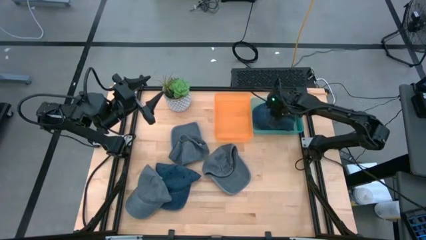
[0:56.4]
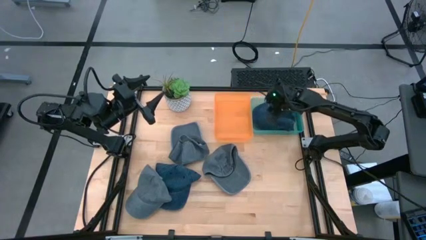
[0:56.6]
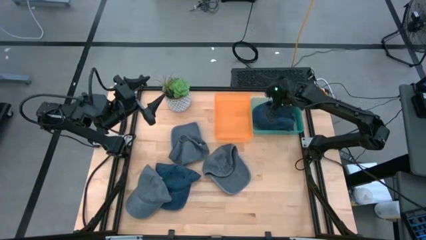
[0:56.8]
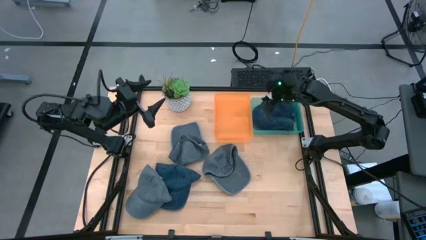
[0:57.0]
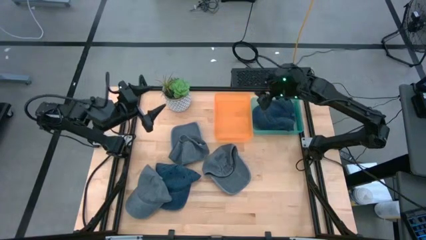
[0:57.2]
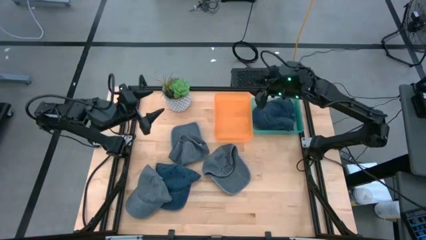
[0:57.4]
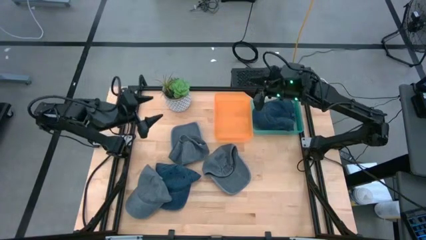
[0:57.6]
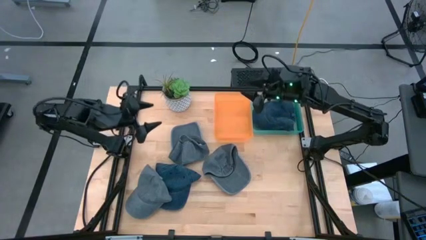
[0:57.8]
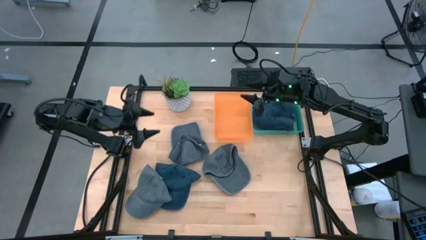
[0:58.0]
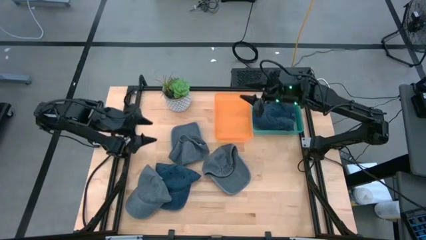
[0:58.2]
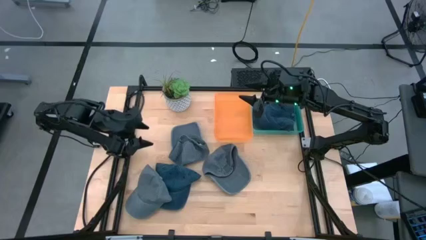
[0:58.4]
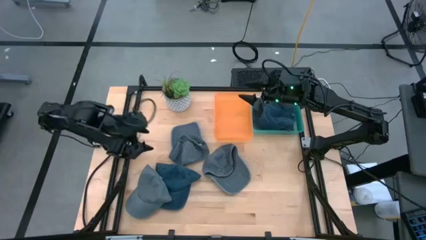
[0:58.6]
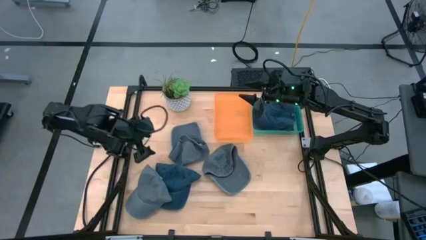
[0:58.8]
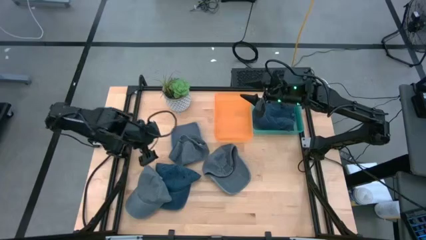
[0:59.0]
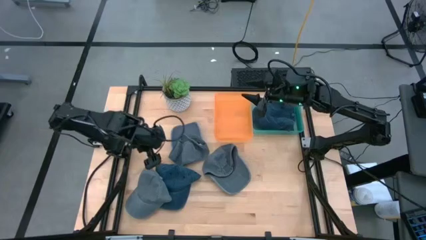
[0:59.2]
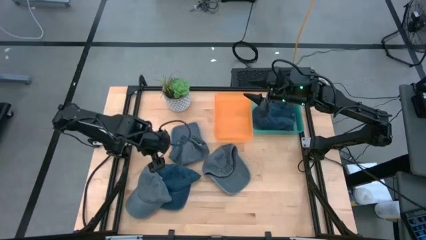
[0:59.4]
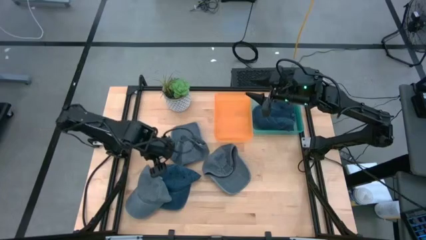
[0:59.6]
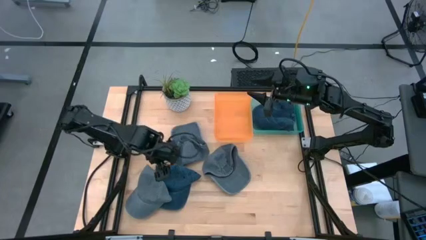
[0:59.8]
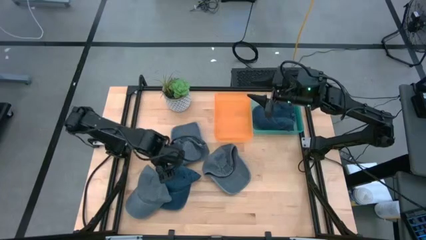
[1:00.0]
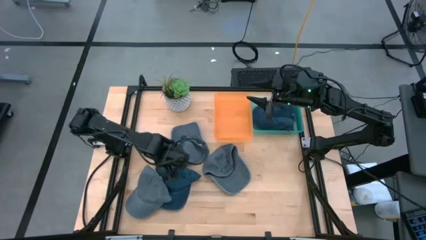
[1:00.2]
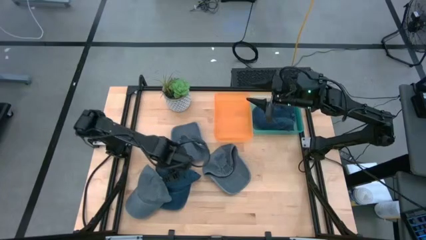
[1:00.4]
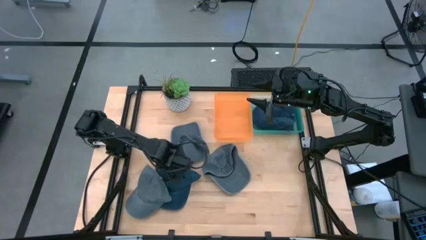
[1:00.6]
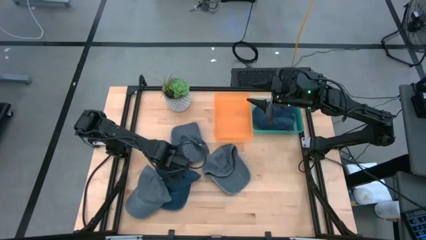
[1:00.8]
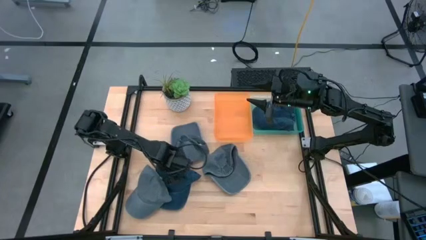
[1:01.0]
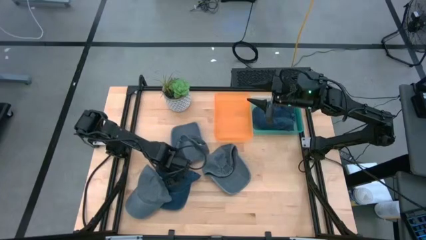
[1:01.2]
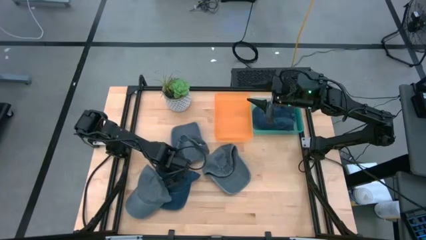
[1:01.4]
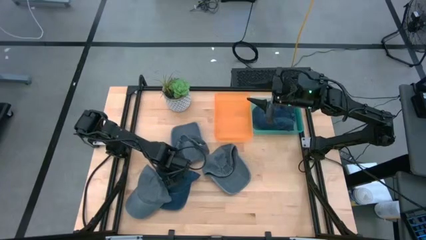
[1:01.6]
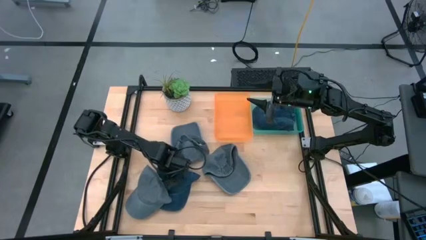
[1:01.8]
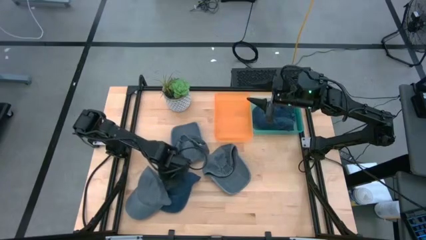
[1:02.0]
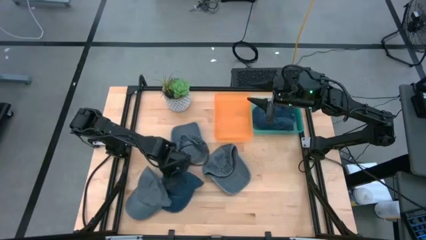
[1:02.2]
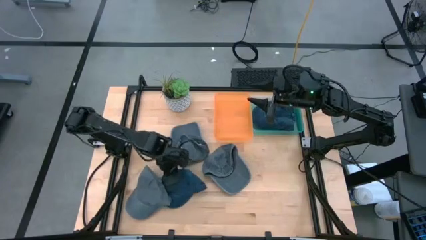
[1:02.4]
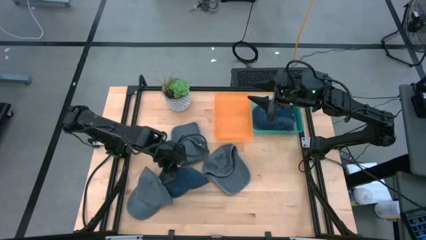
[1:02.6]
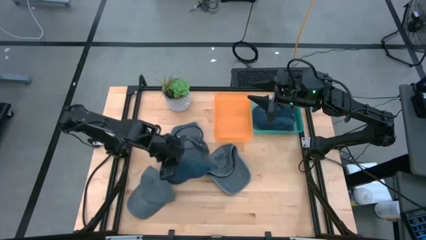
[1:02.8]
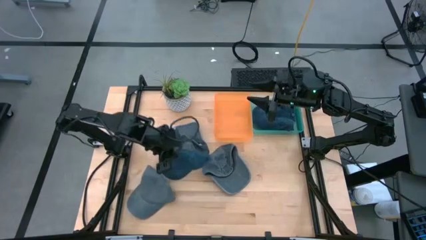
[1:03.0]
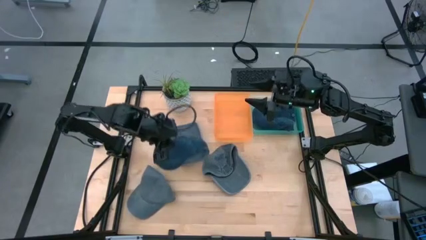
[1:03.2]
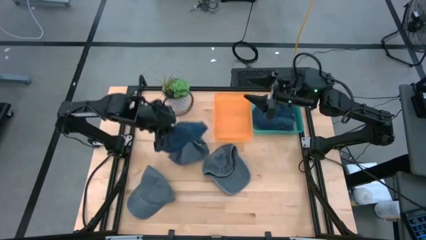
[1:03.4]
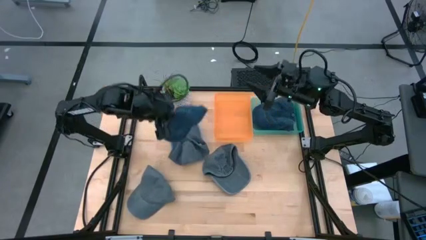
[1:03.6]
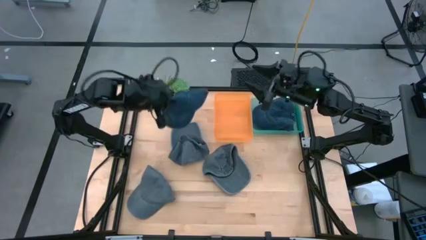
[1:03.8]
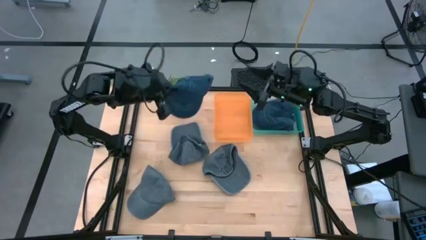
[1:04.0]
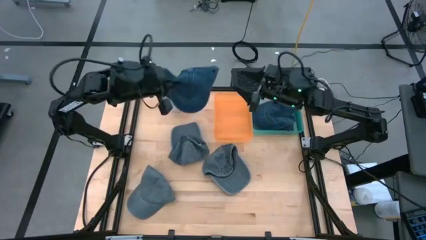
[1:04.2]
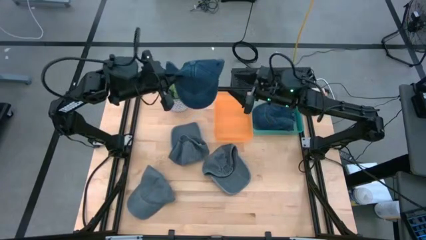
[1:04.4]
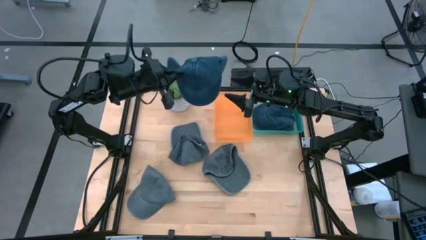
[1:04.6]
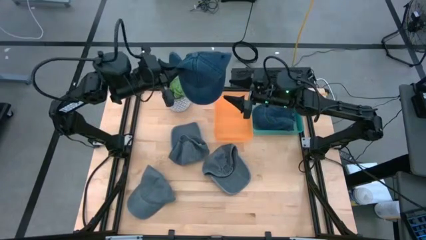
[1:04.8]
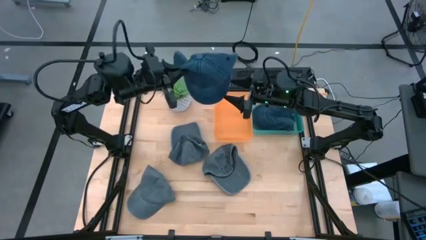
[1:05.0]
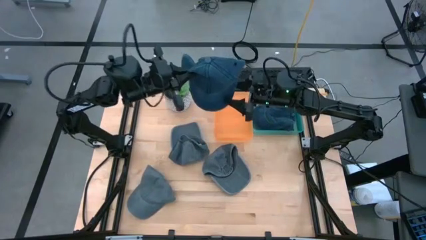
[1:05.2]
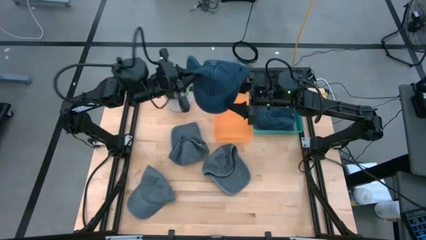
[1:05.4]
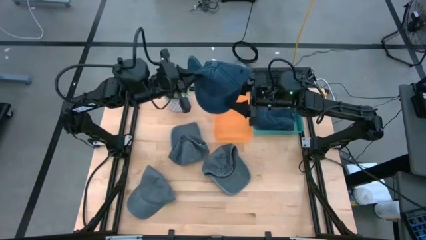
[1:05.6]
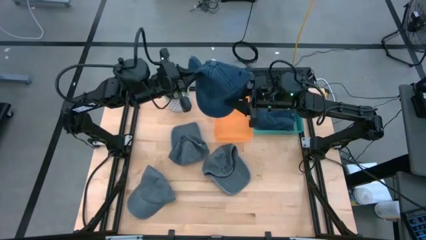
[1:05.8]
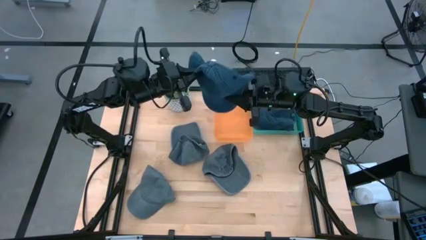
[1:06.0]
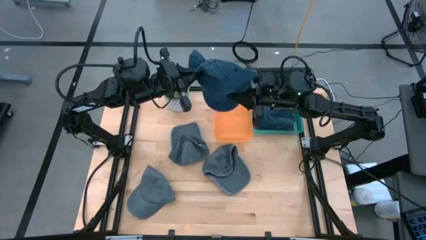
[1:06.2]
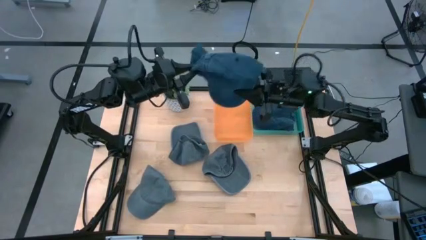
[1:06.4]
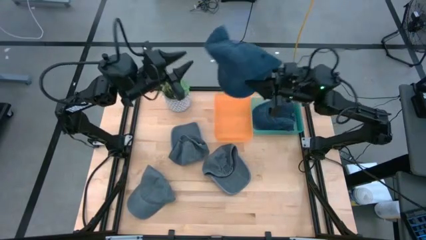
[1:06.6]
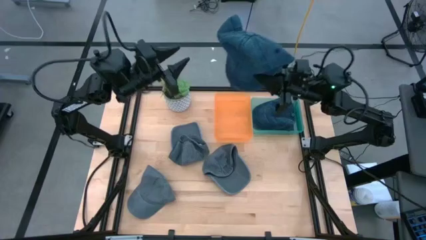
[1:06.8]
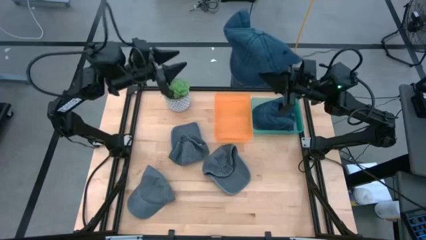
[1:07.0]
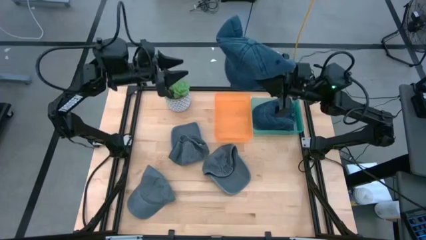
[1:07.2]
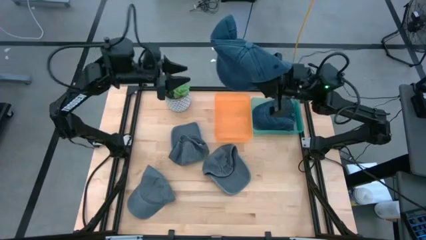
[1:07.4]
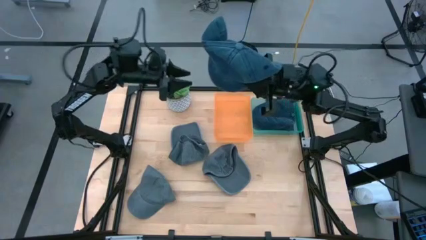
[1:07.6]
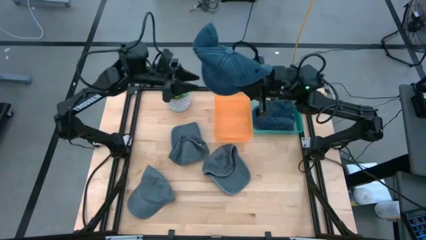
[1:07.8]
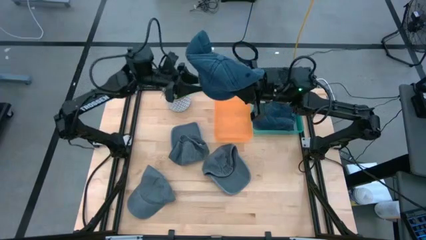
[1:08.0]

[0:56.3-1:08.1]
Task: Pick & Place hat
Put the blue cap in the blue bin

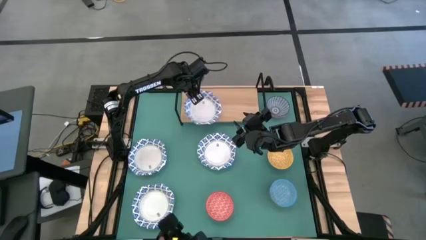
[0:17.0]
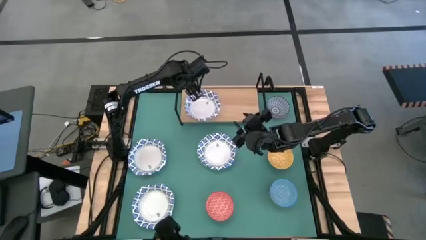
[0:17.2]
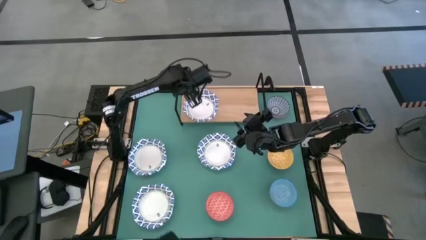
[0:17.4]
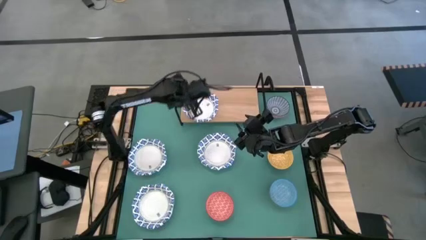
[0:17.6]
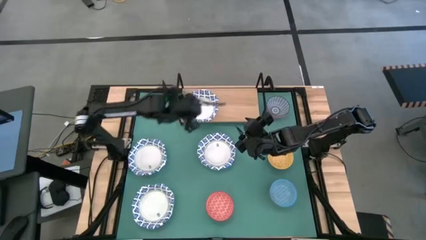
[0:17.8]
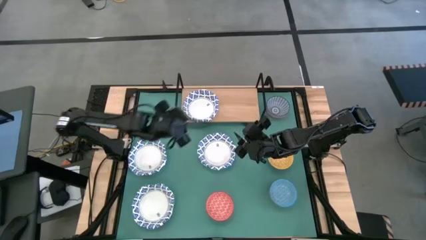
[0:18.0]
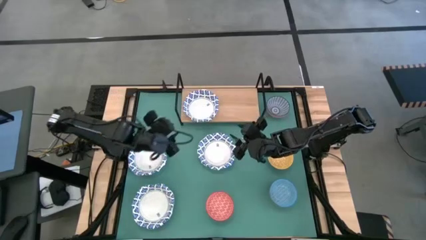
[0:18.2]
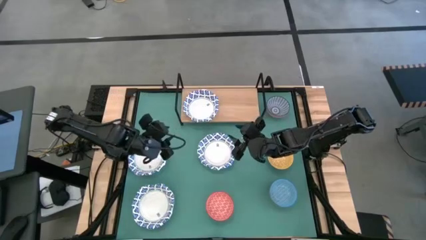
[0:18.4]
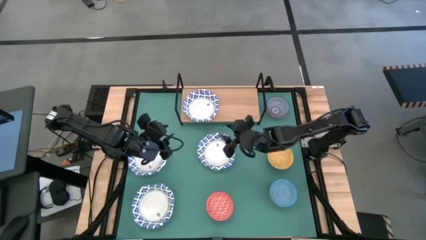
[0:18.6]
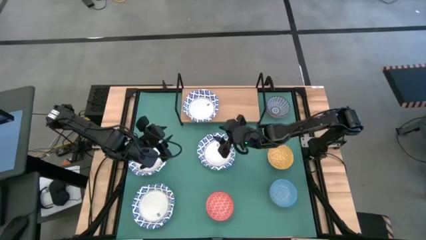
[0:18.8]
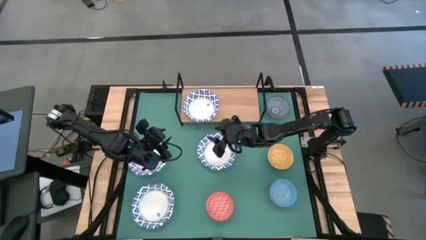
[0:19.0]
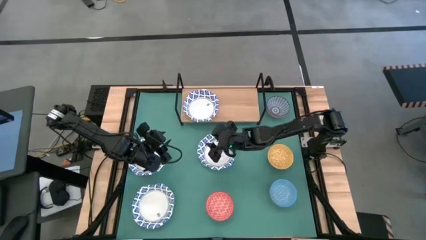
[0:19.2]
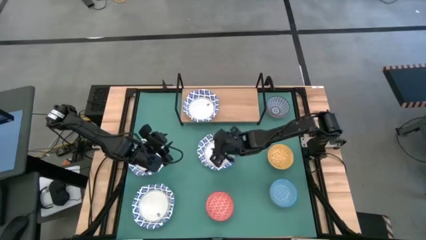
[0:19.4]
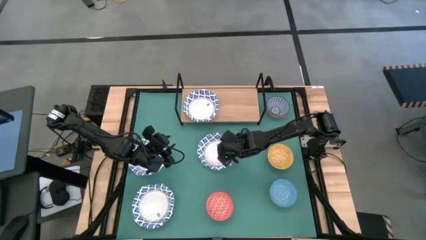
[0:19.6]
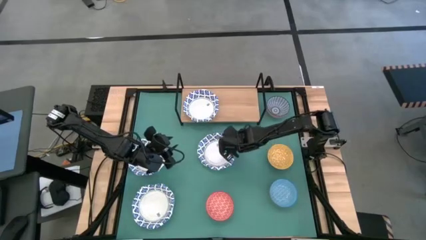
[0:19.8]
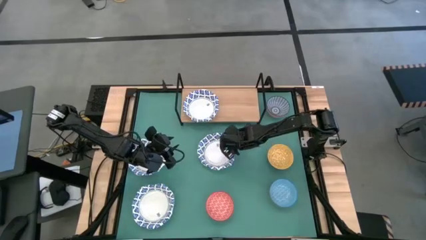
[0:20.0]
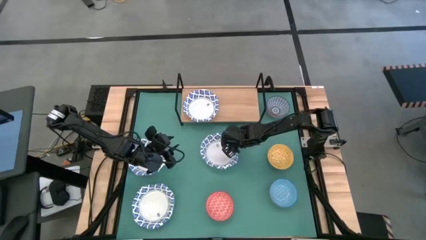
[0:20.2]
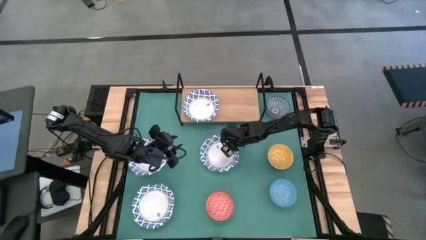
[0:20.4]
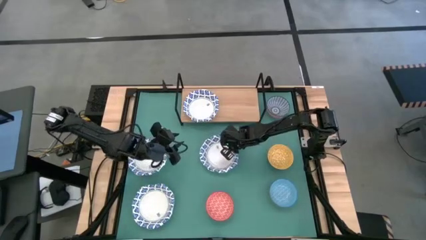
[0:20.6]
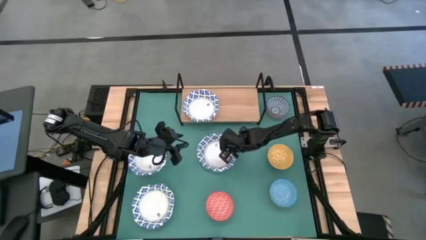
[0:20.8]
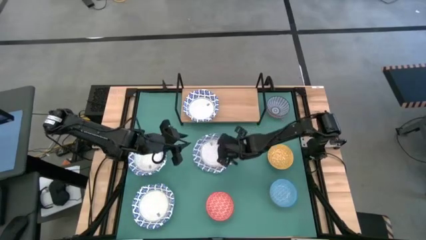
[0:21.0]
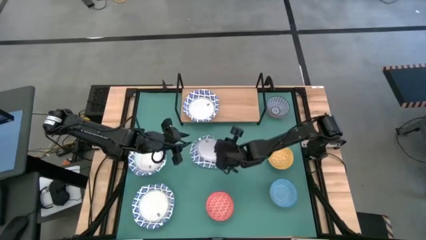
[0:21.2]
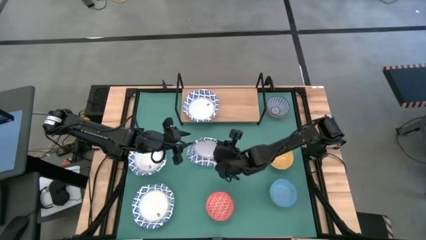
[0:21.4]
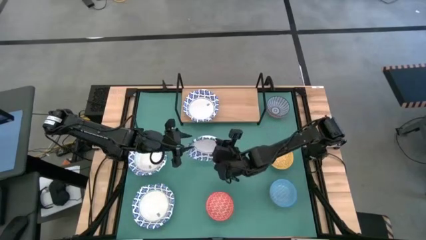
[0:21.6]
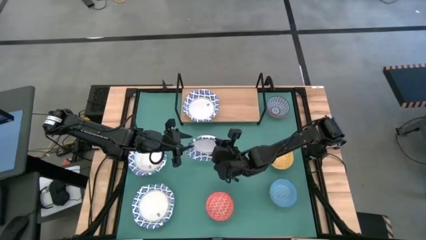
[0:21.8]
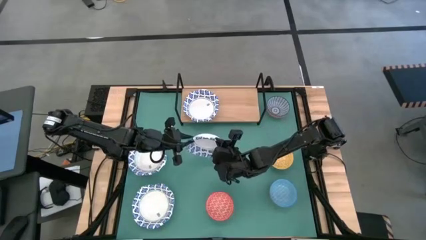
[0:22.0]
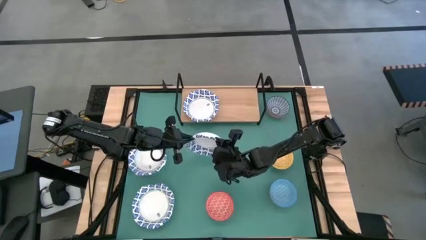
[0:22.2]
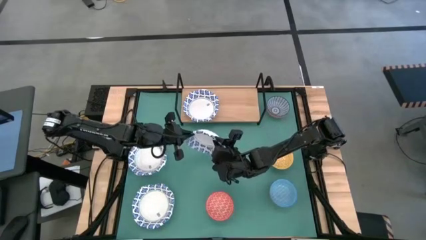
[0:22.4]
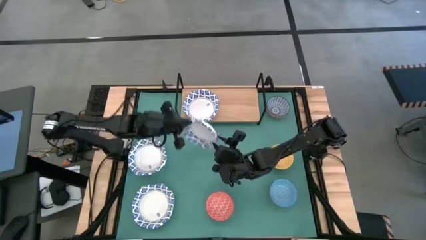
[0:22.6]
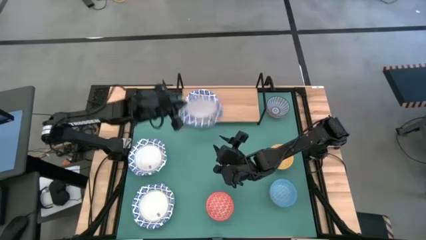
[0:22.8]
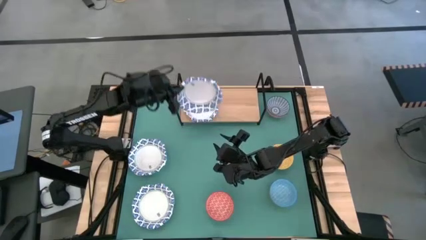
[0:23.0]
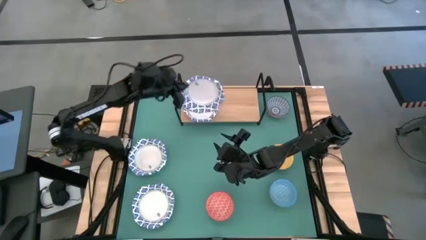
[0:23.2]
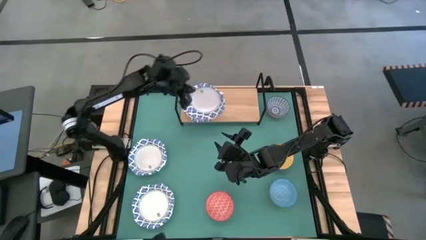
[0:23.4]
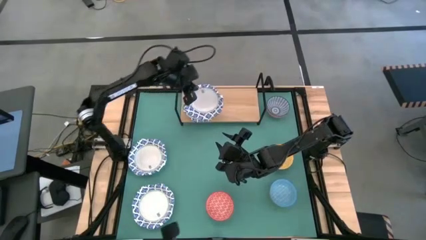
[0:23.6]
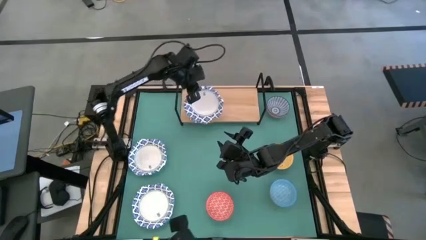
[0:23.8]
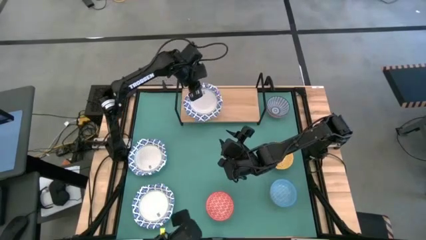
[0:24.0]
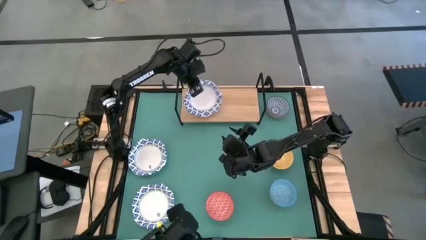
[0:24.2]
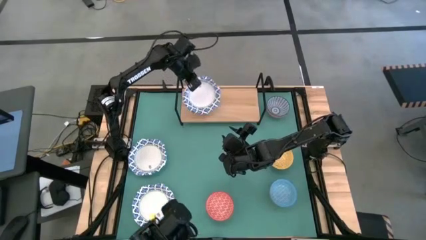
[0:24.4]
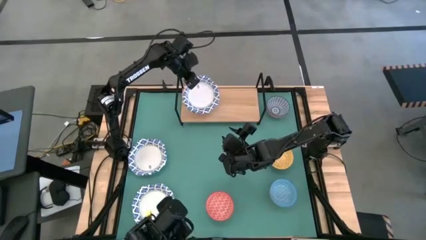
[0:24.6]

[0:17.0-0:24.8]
Task: Place and stack bowls onto a shelf
Stack the white patterned bowl on top of the white patterned bowl on the shelf
